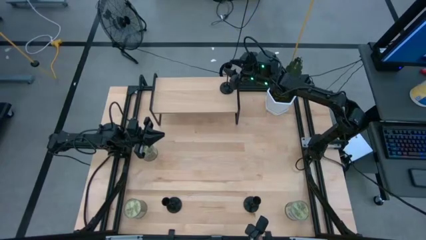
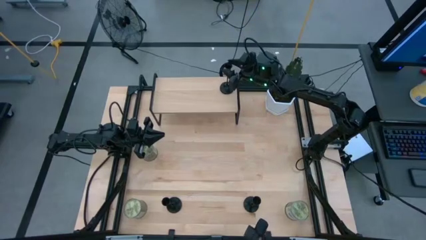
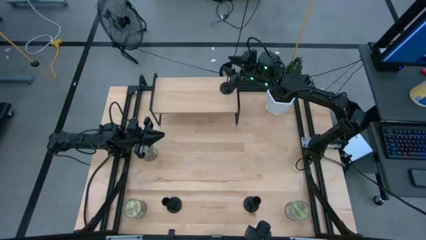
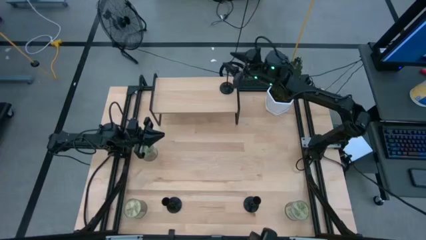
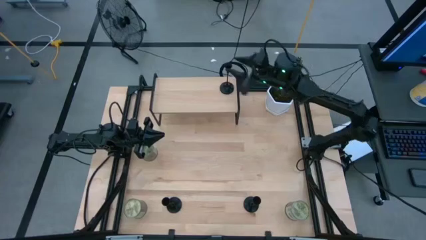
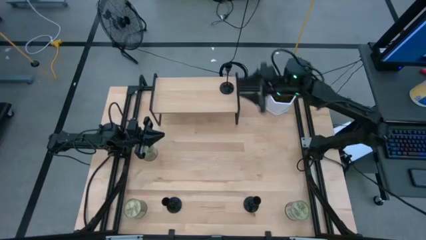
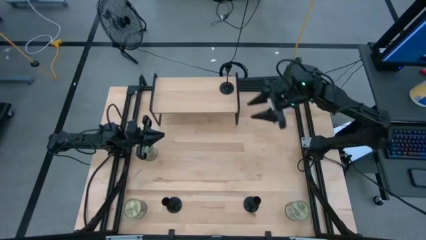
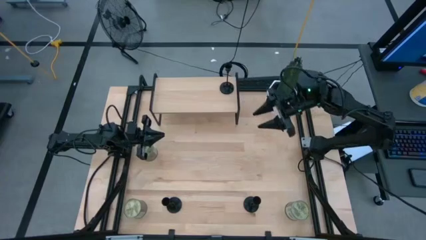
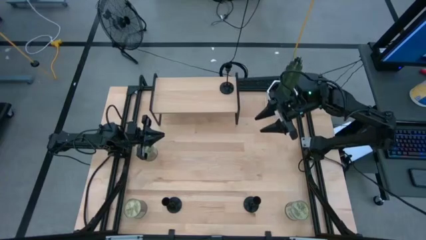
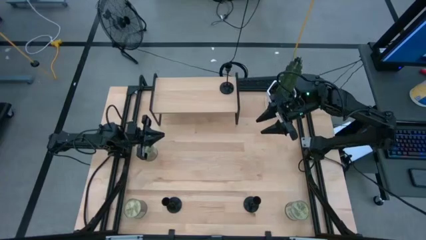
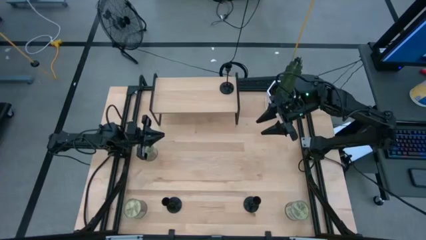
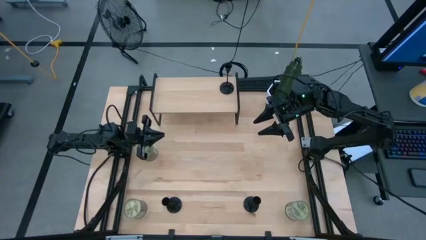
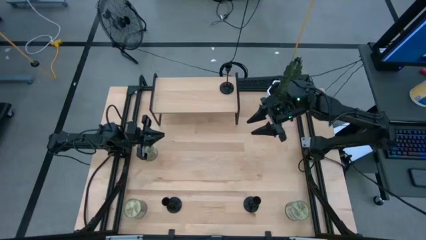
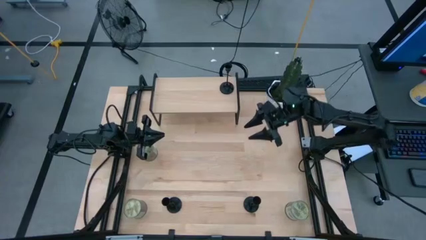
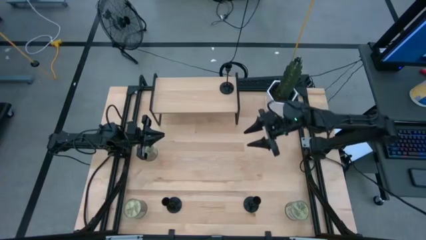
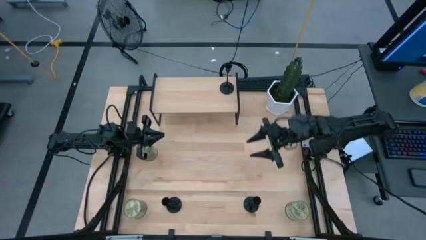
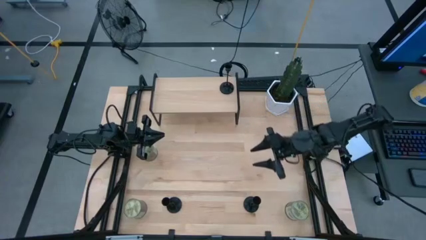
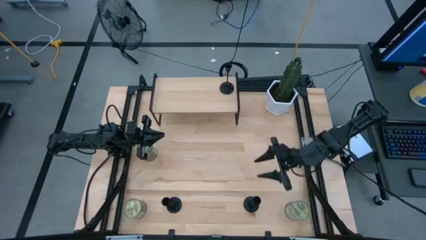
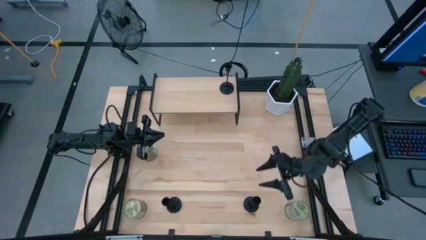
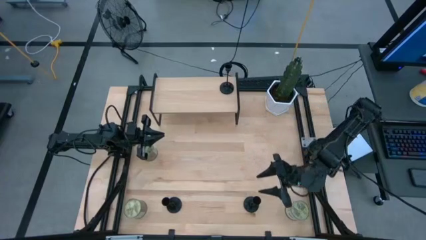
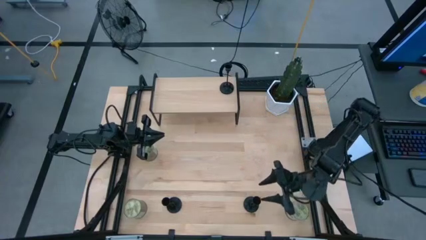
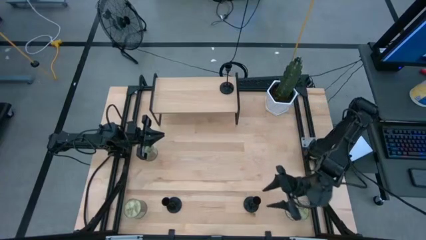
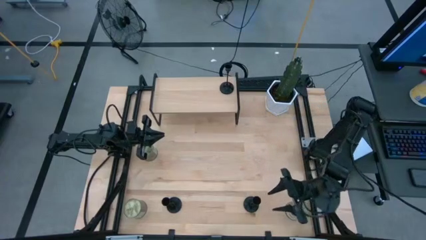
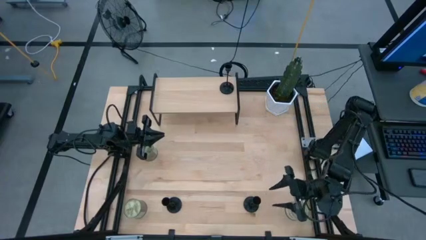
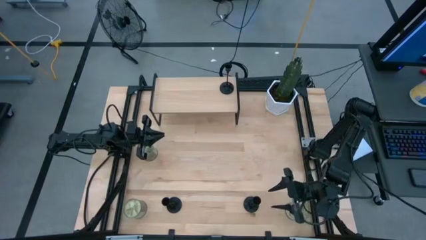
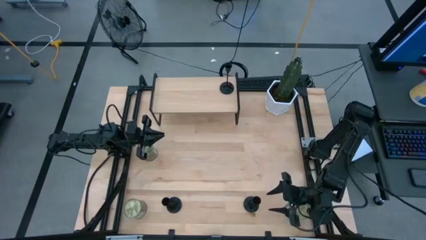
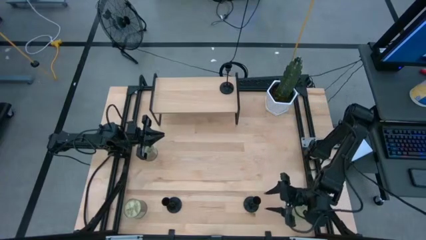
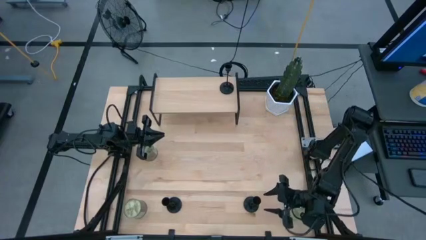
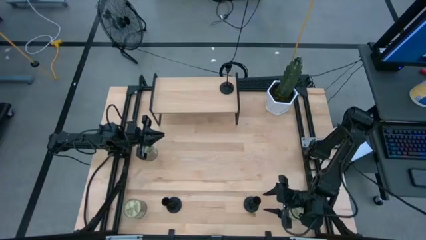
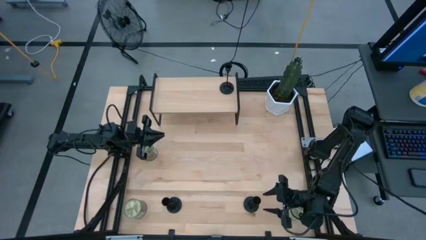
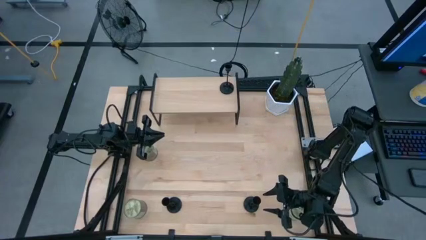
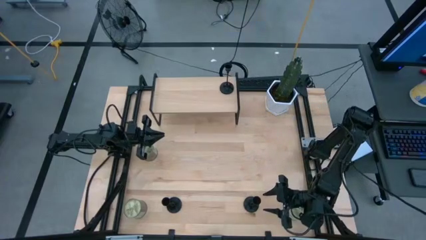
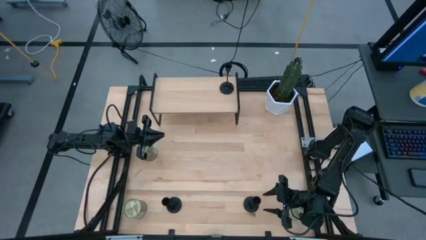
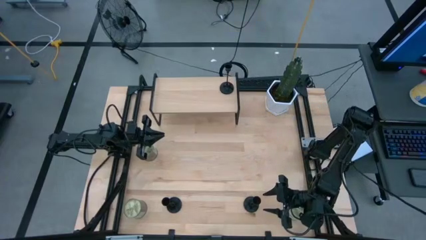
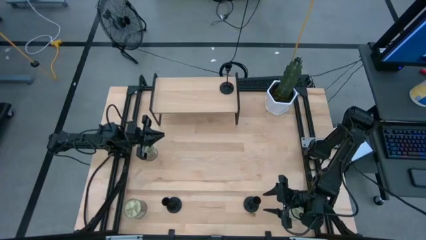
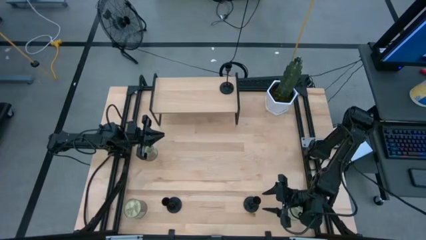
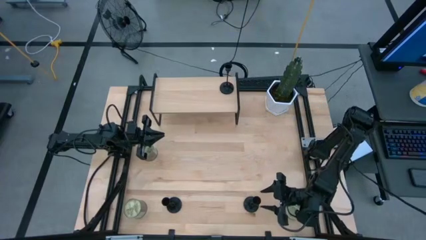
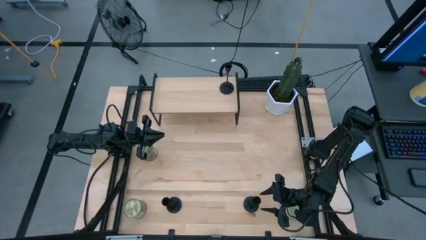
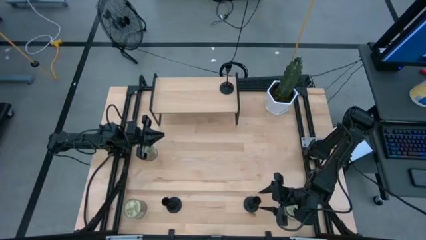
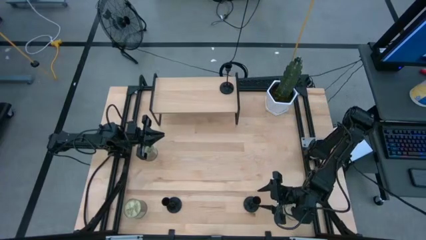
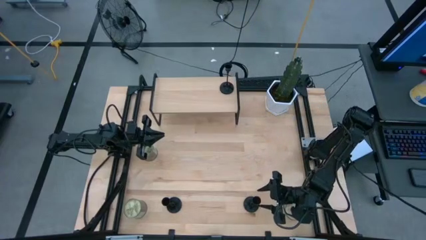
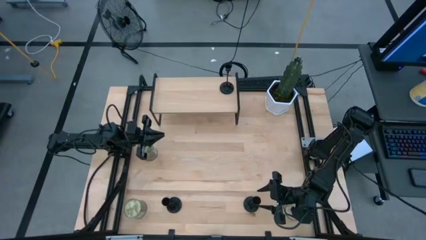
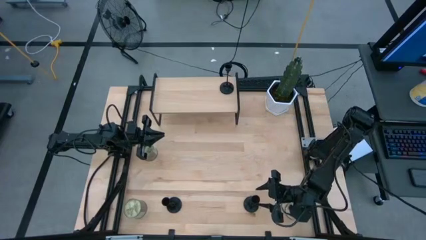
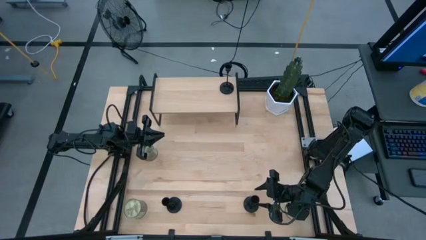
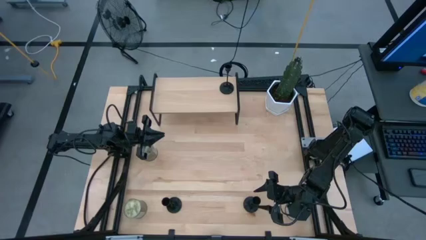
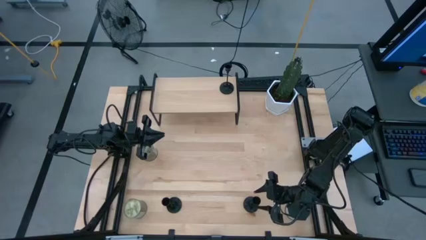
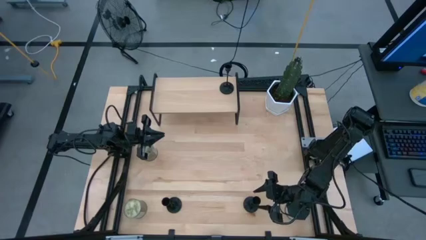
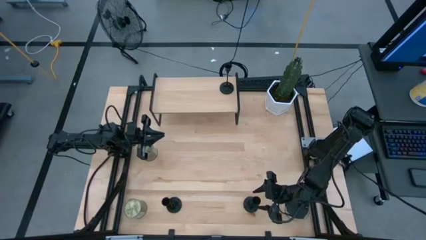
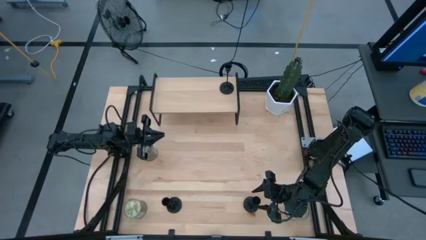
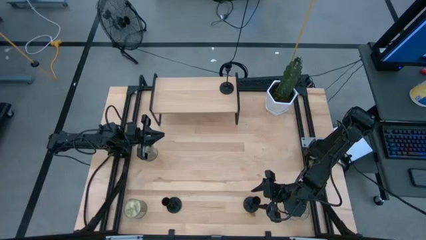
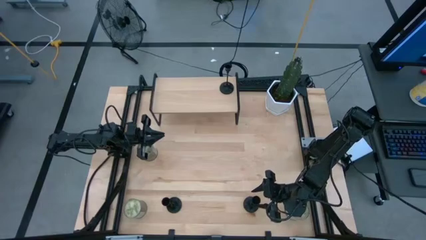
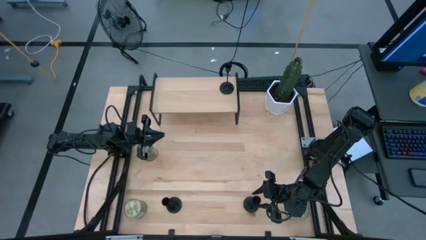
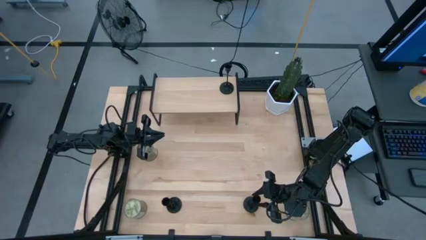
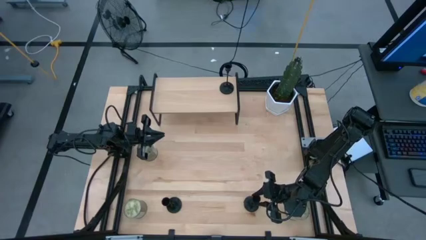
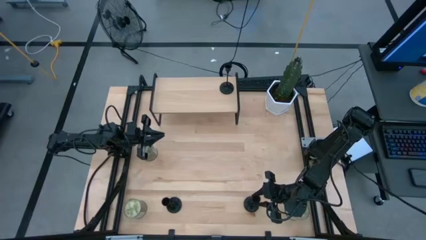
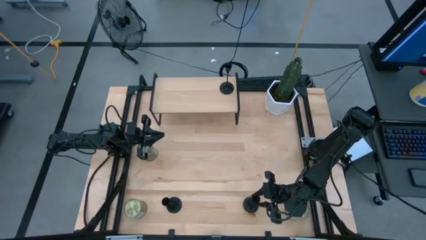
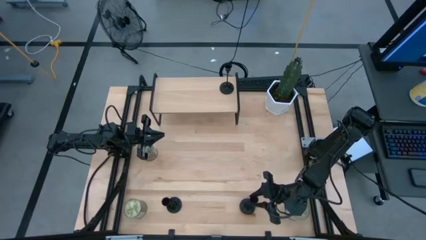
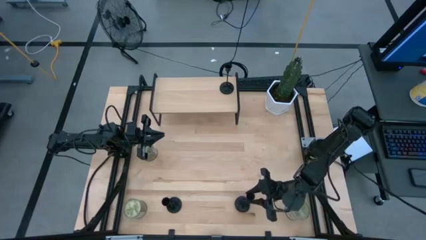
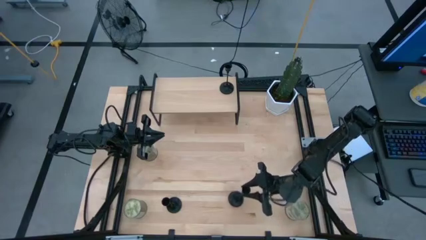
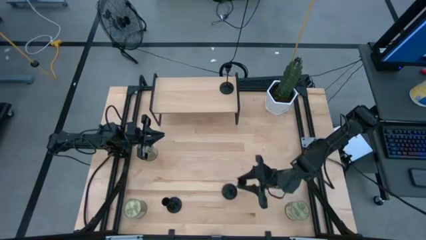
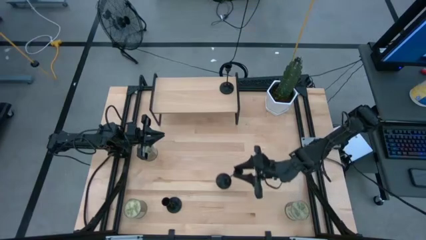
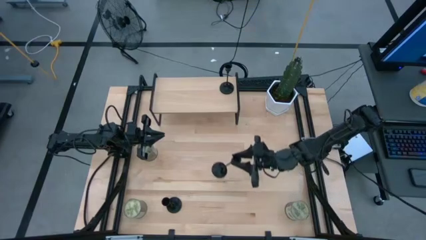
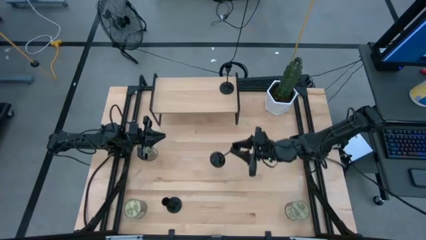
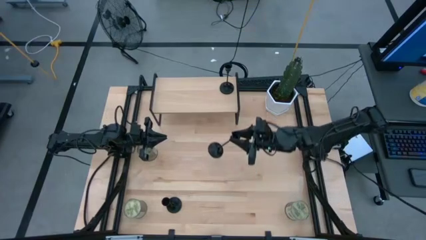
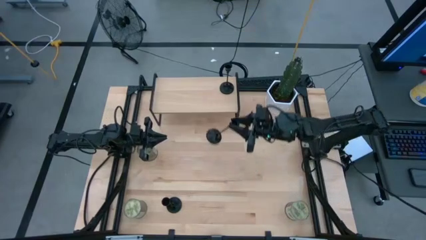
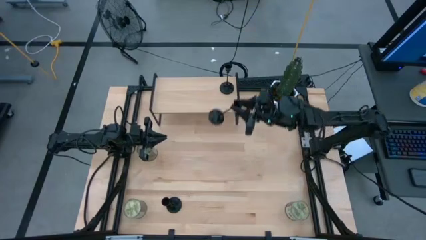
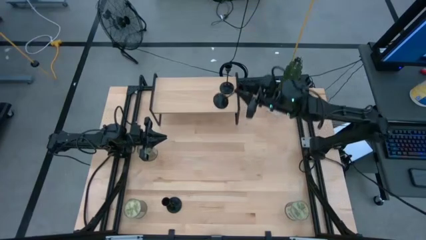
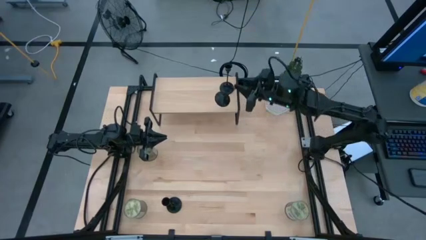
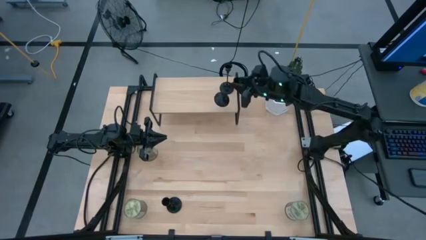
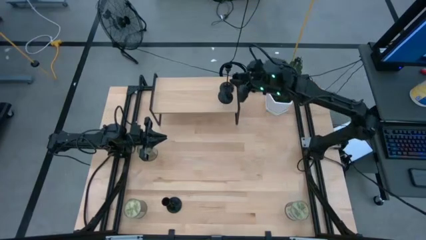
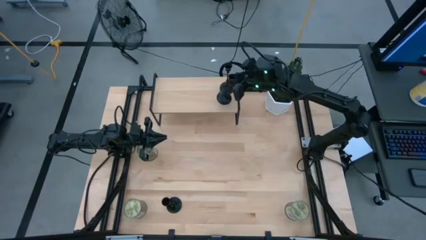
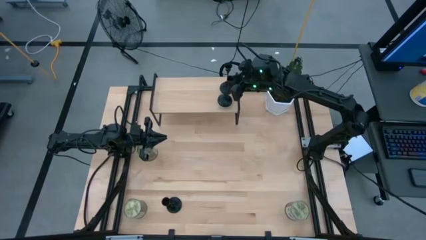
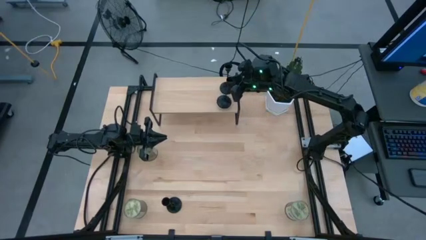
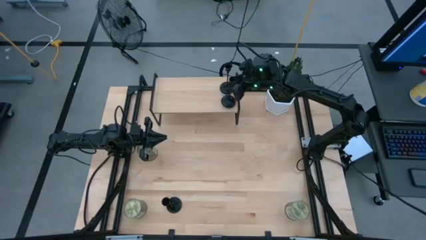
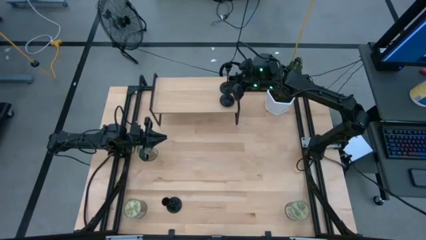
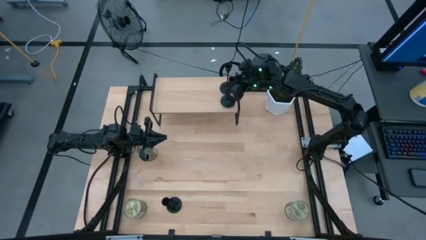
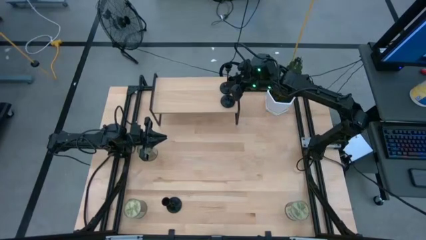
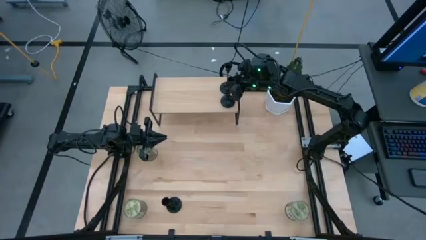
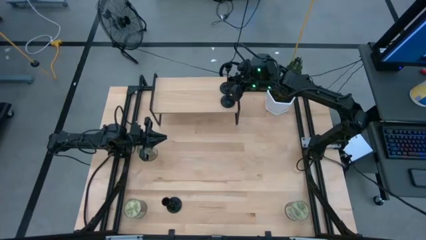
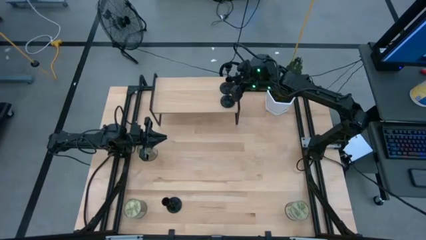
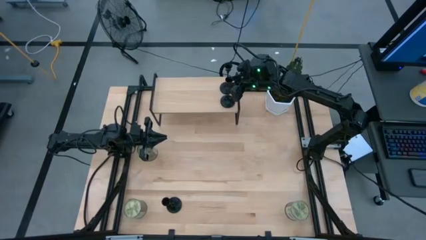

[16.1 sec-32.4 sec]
Task: Pick & Place candle stick holders
Align the right black candle holder with the other black candle holder on the shelf
